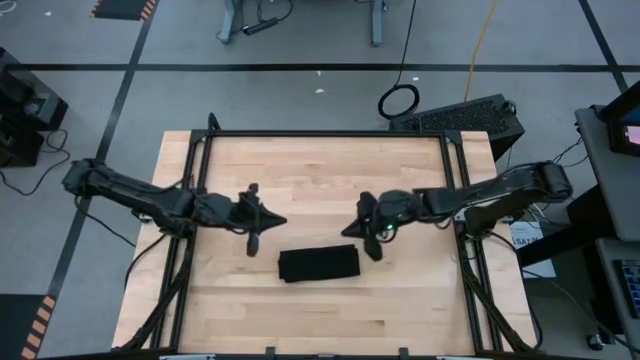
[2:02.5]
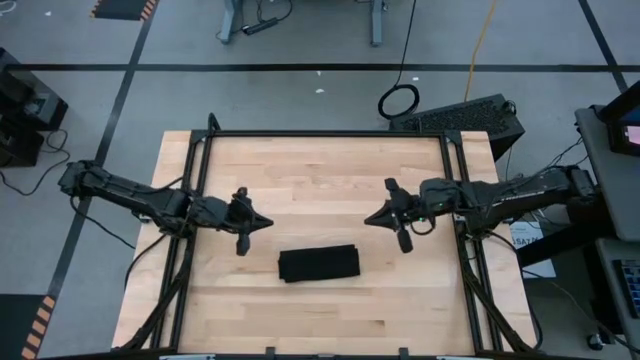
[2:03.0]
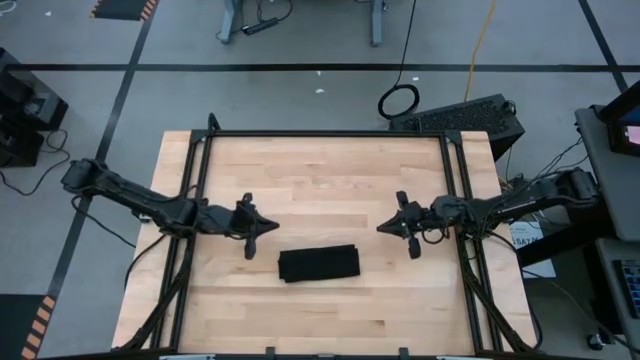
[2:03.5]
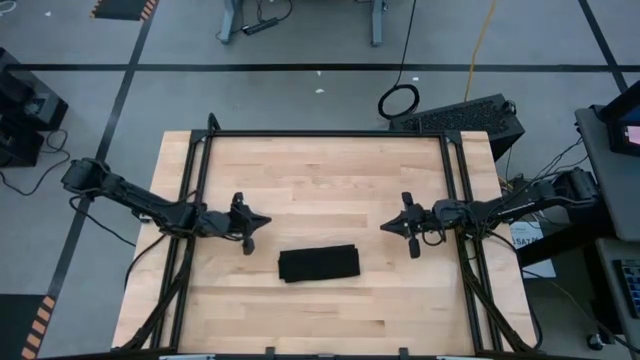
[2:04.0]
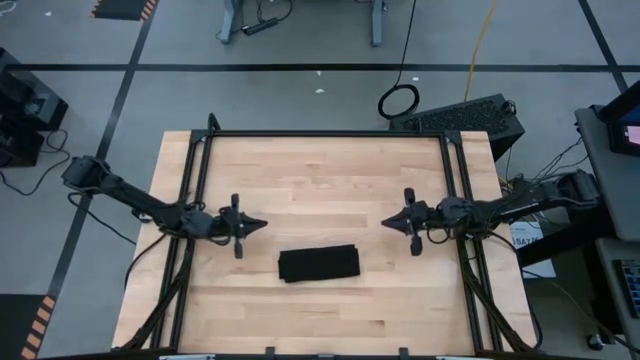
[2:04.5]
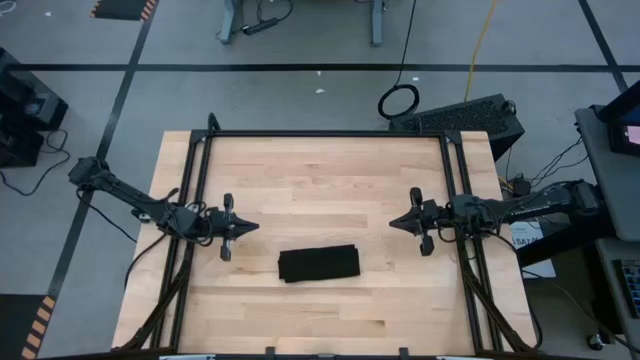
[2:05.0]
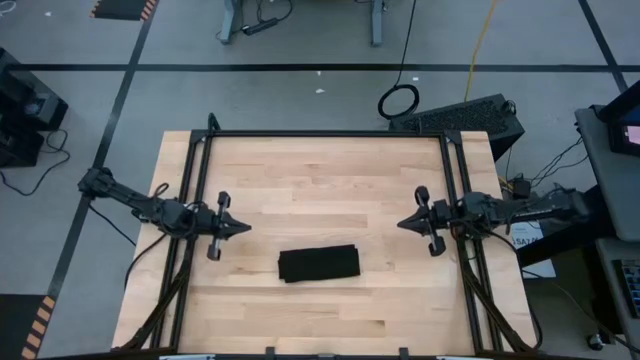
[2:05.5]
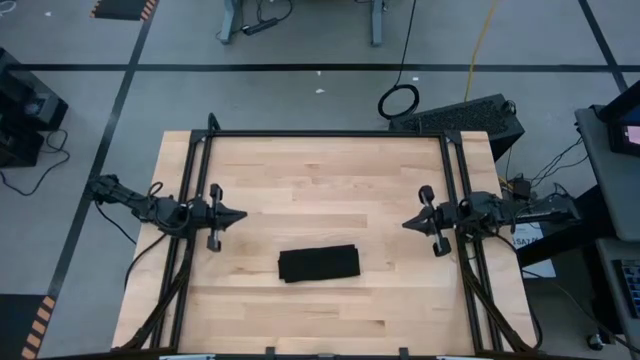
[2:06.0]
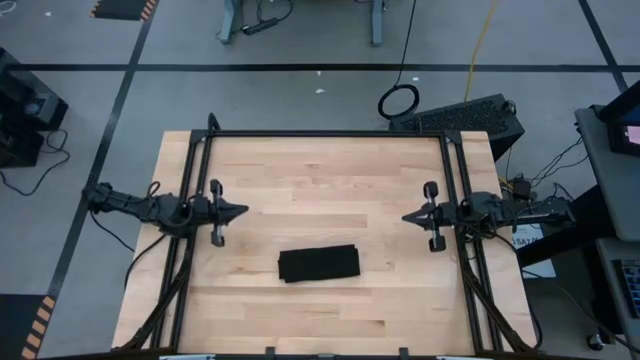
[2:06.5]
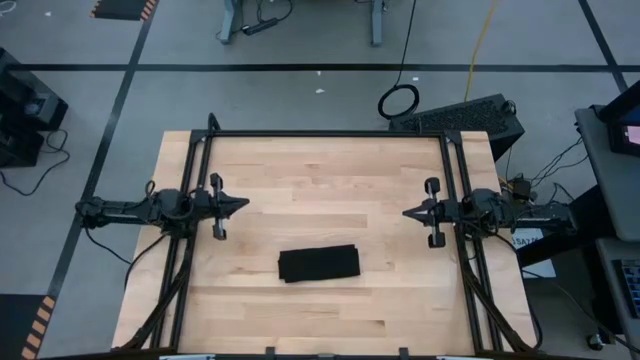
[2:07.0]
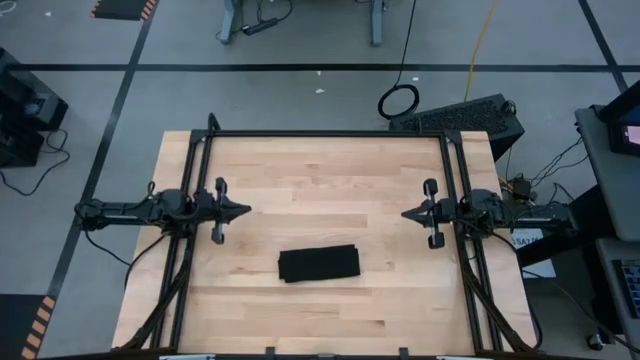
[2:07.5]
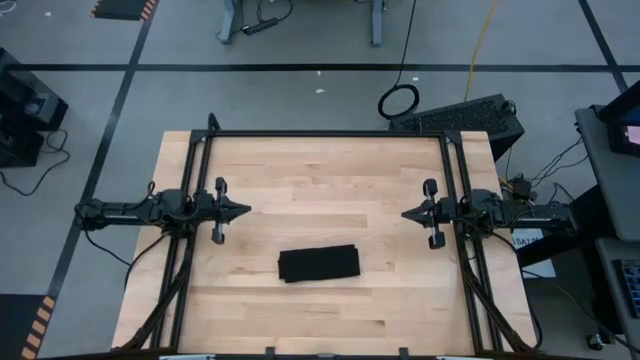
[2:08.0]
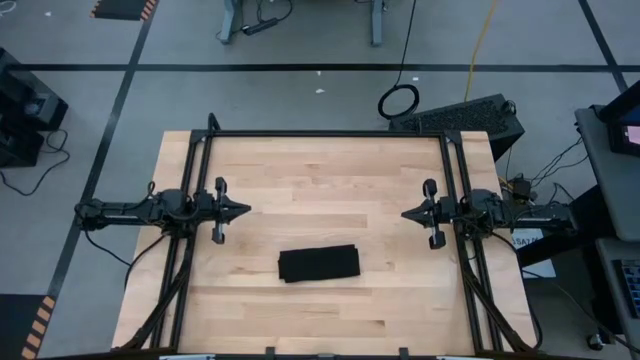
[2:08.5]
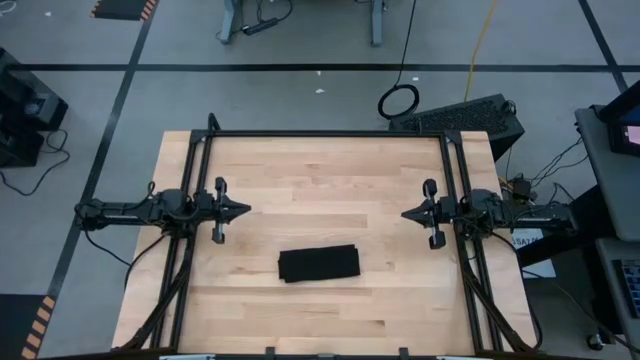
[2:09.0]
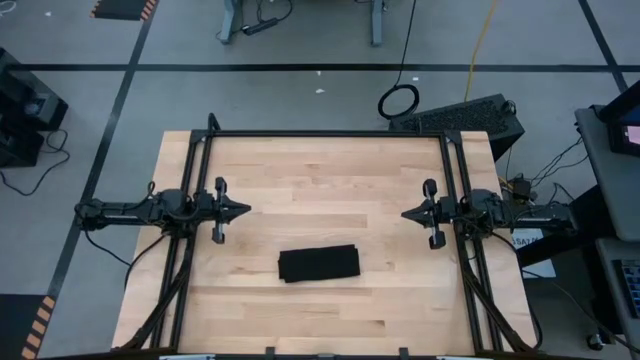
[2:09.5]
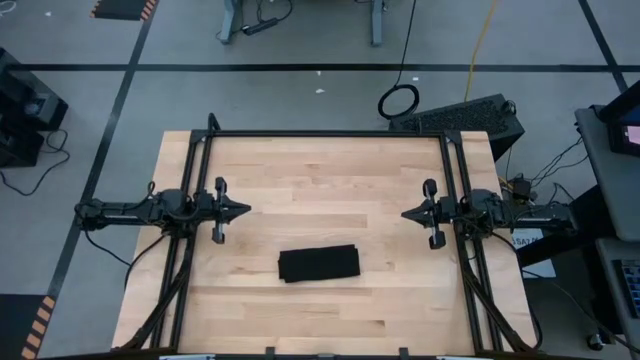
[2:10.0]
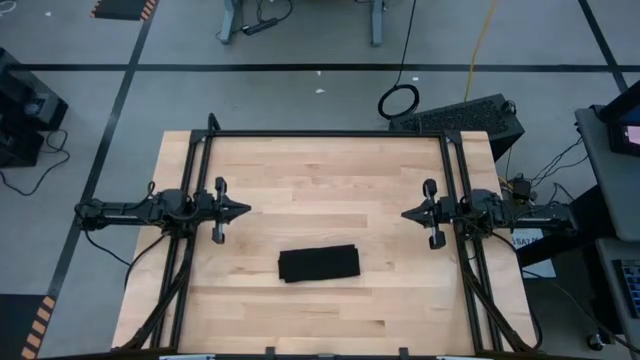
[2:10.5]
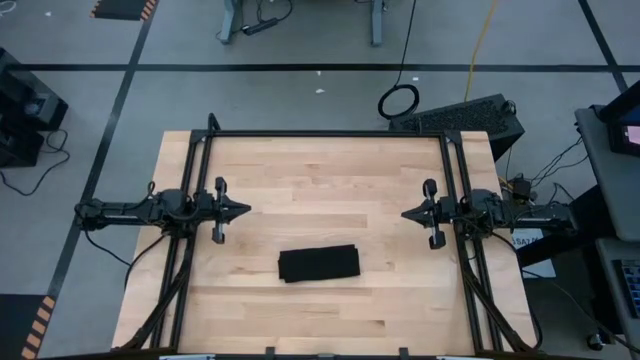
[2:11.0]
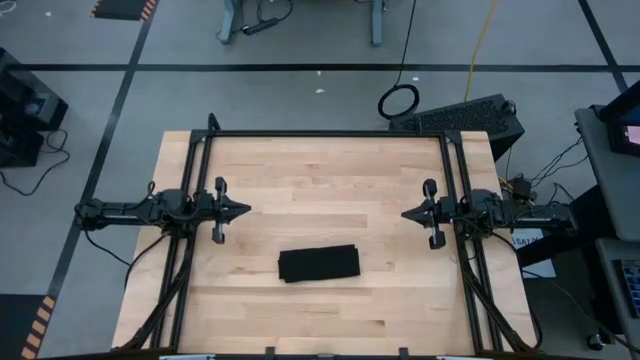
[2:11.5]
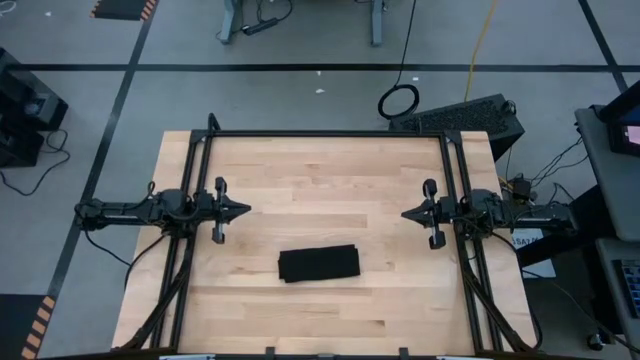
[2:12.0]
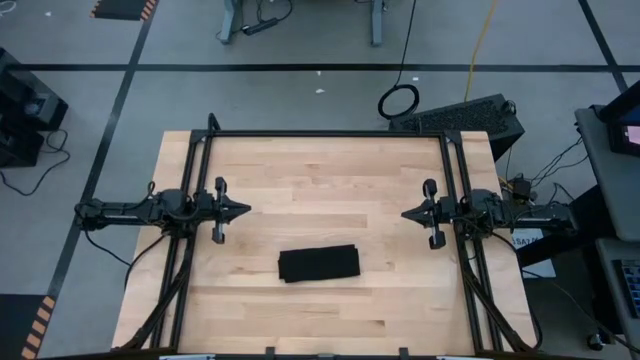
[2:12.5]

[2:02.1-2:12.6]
Task: Roll towel
Return to Home Position

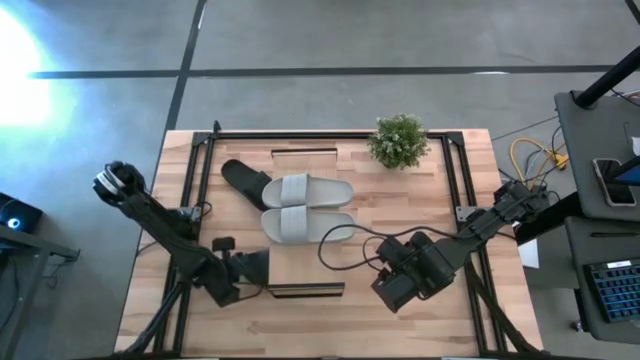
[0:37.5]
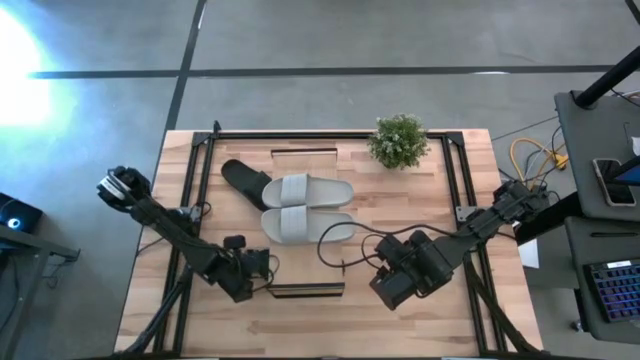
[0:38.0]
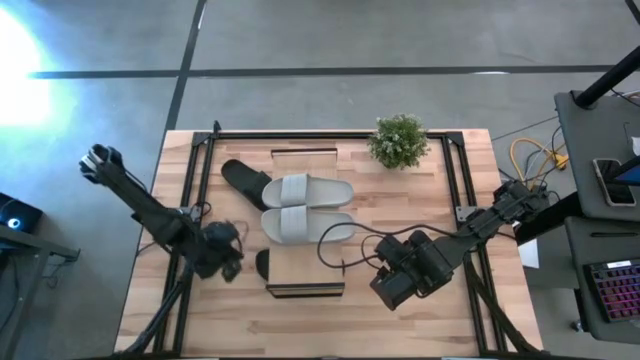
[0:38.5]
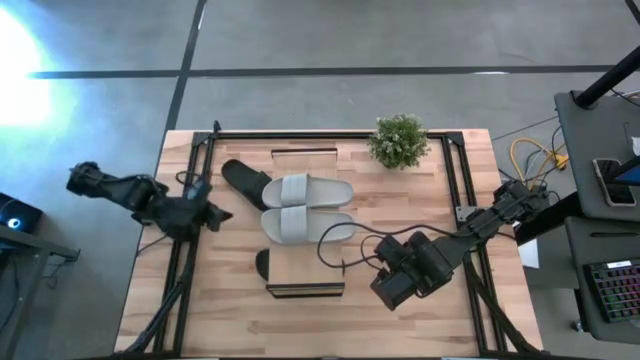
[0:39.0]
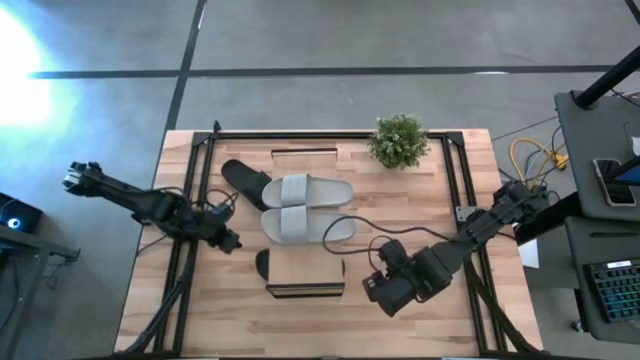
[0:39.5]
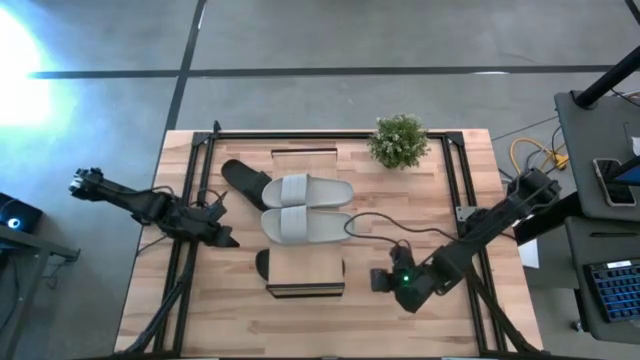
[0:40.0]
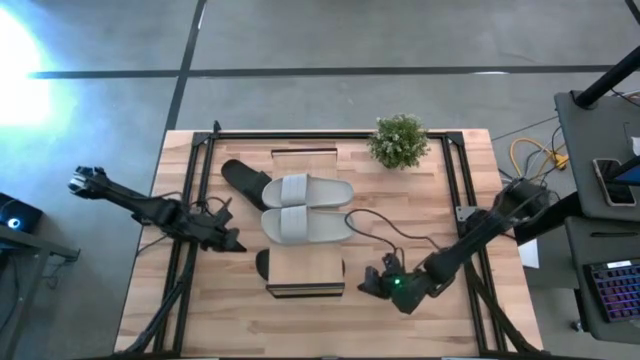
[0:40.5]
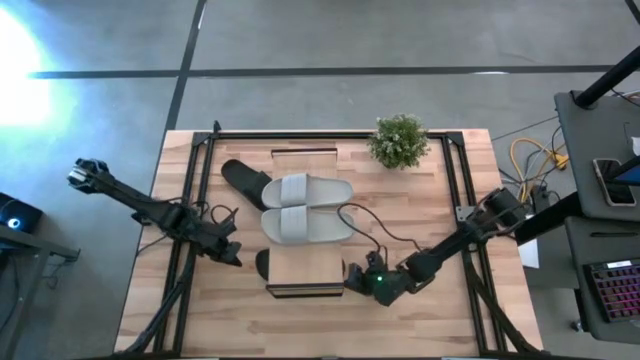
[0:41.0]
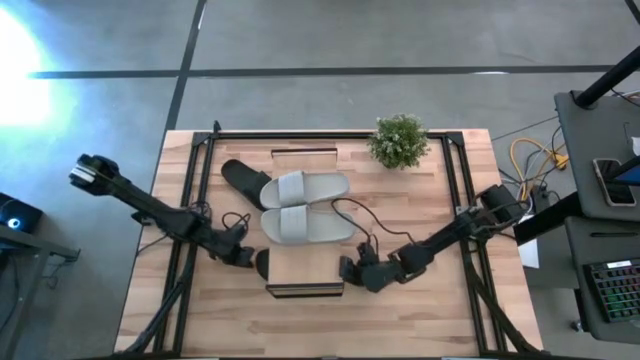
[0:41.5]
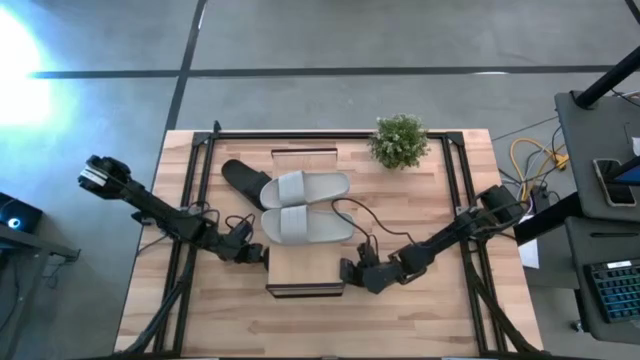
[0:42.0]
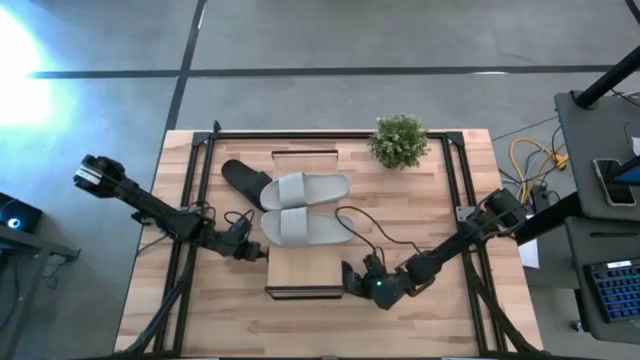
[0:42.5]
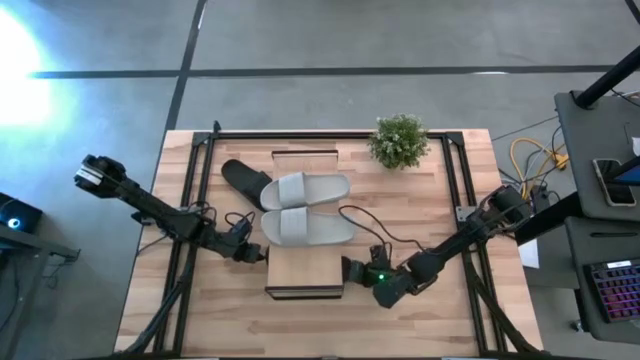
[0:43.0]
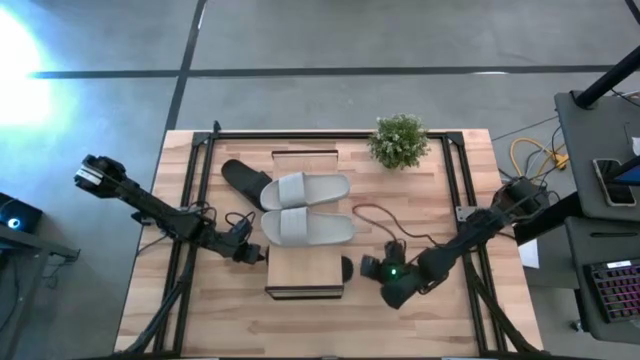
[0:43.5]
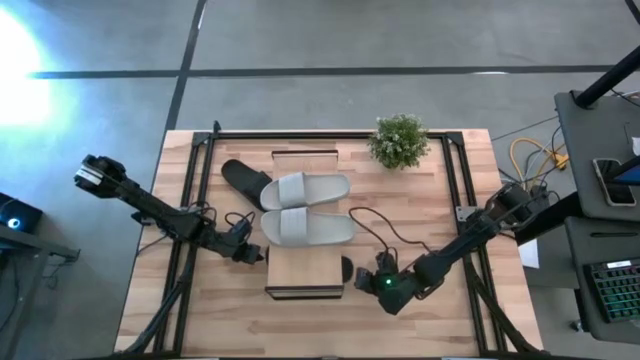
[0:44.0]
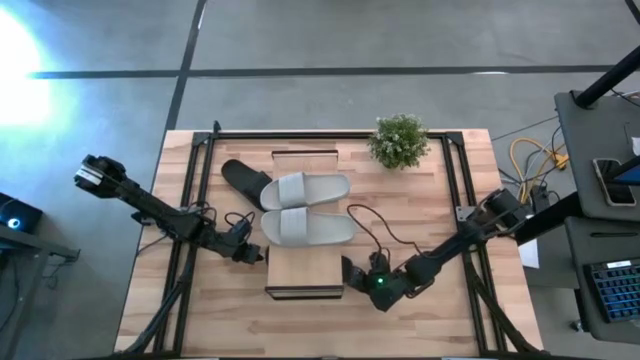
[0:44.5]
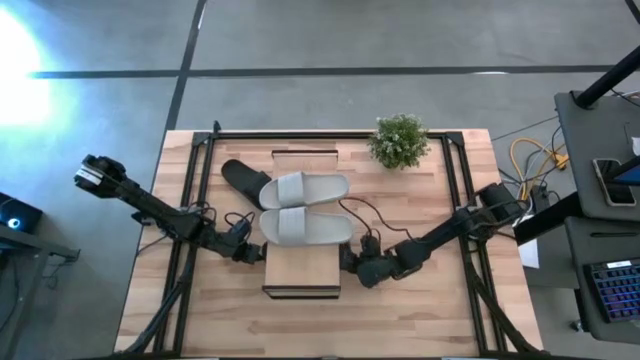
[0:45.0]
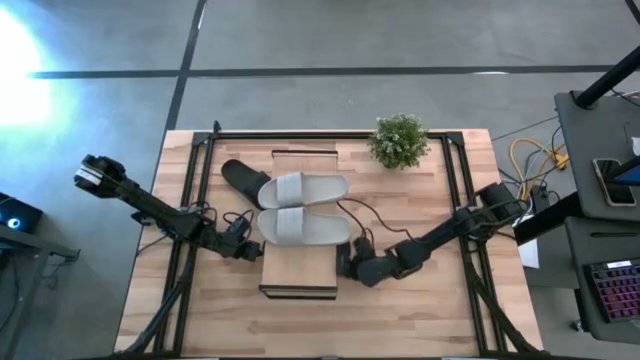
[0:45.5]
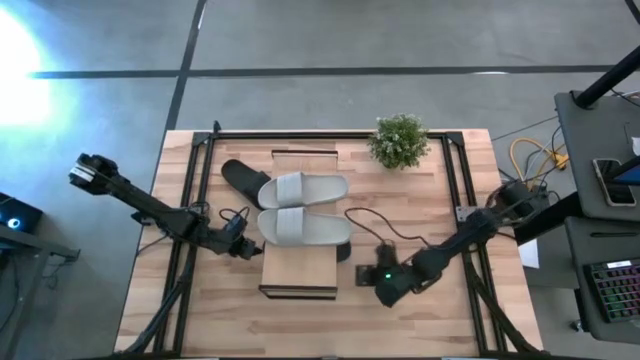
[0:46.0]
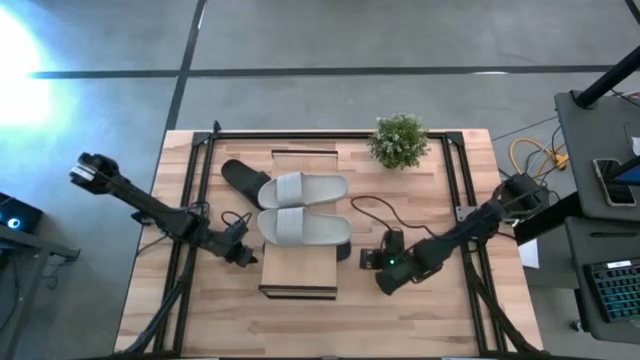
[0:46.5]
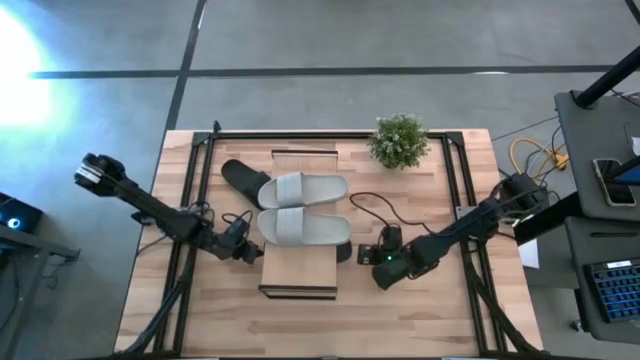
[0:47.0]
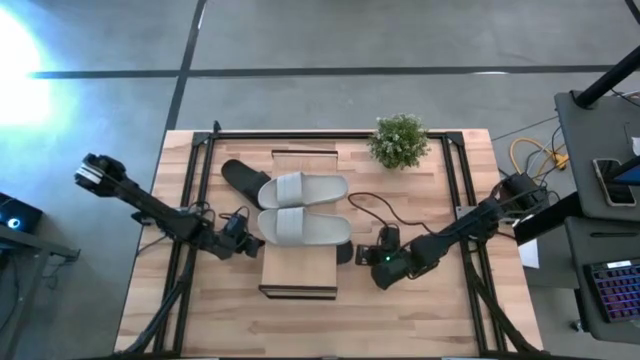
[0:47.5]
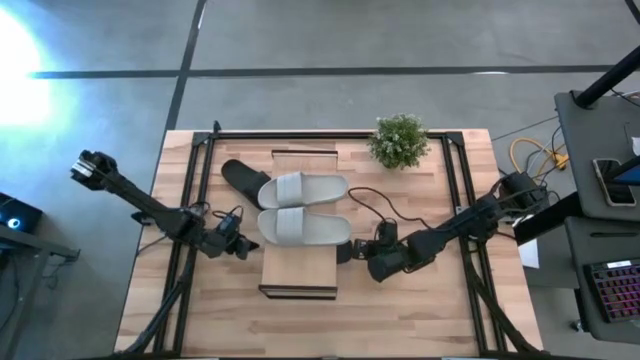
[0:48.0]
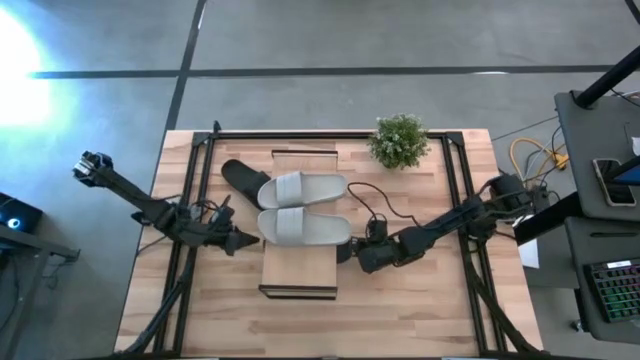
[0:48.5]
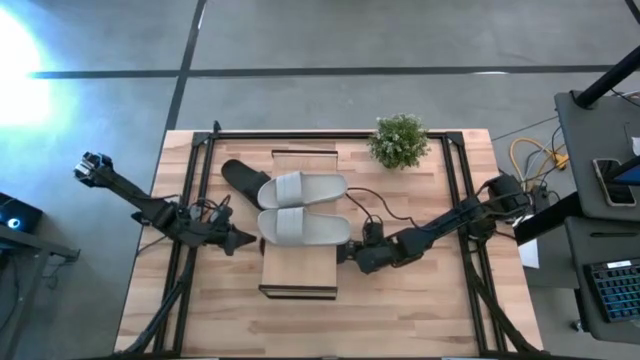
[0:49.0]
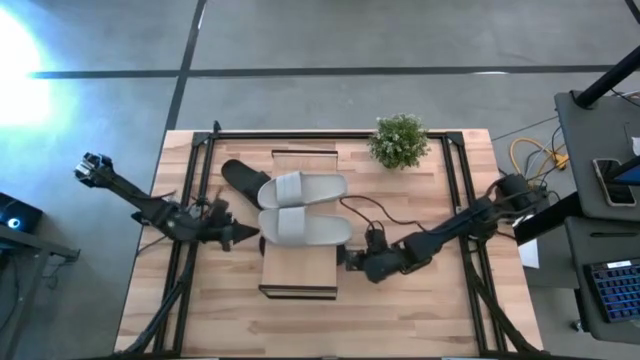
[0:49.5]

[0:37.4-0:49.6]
Task: Pick and place slides into the shelf
Move the bottom black slide under the shelf
